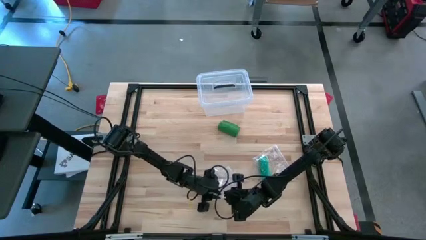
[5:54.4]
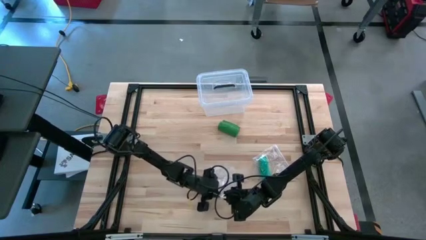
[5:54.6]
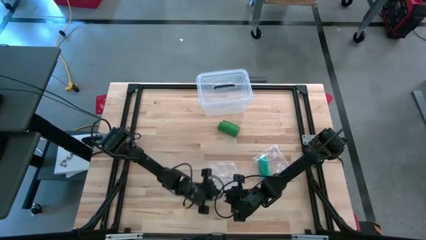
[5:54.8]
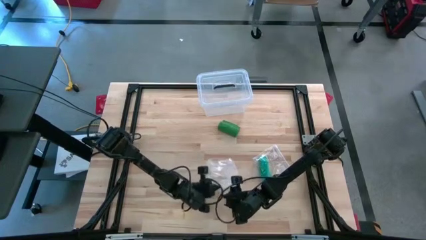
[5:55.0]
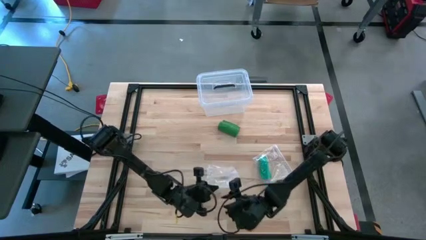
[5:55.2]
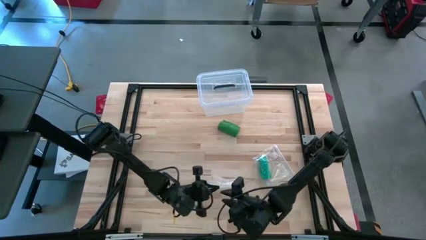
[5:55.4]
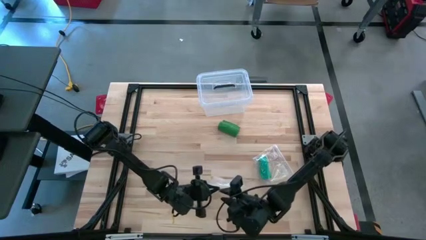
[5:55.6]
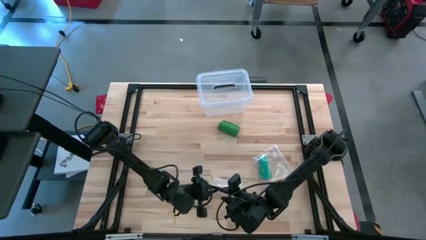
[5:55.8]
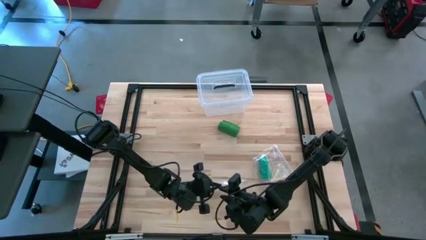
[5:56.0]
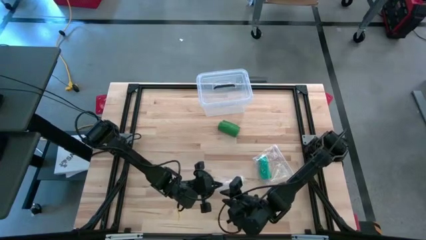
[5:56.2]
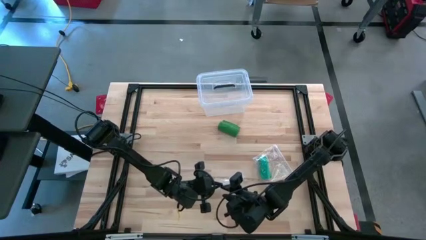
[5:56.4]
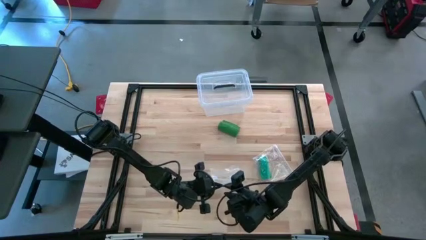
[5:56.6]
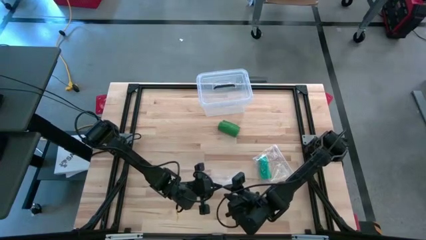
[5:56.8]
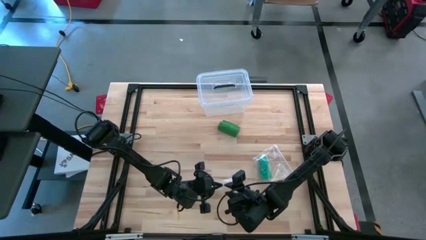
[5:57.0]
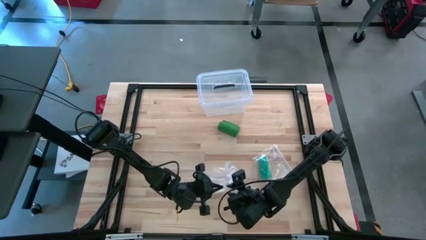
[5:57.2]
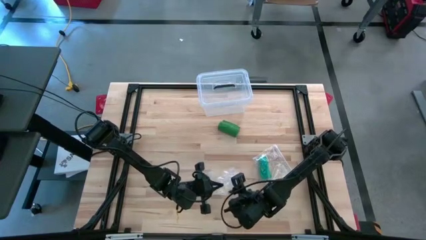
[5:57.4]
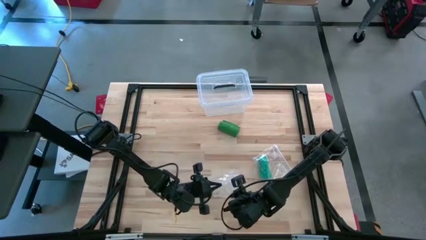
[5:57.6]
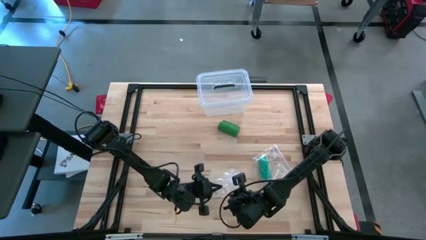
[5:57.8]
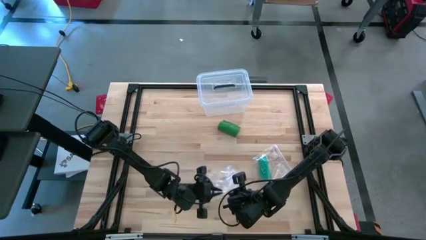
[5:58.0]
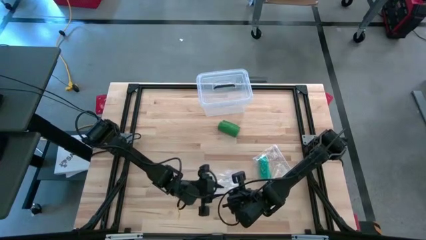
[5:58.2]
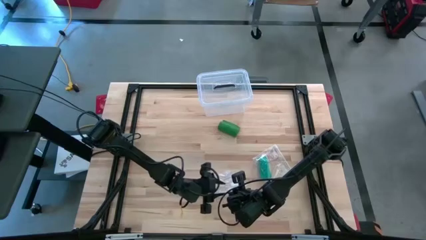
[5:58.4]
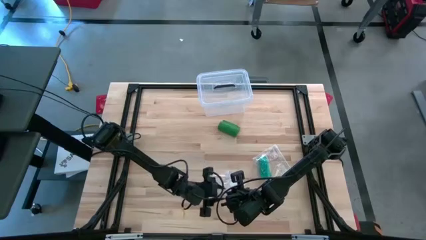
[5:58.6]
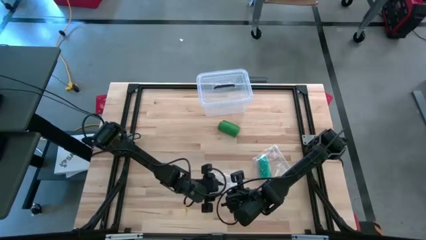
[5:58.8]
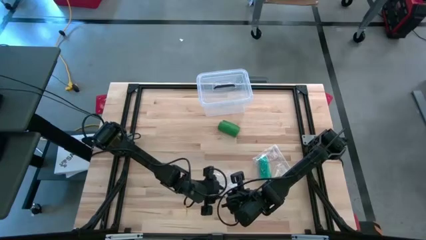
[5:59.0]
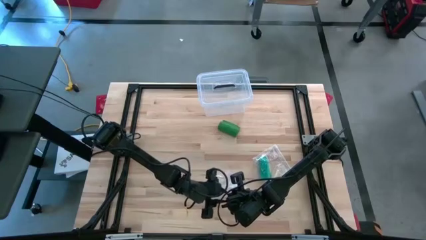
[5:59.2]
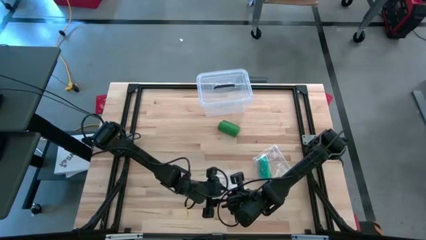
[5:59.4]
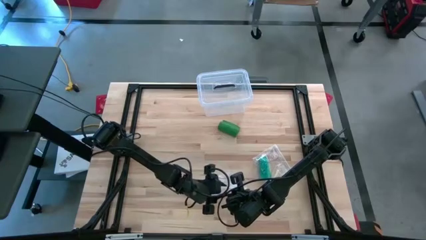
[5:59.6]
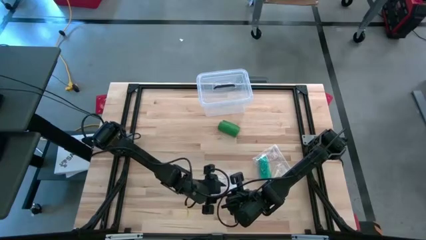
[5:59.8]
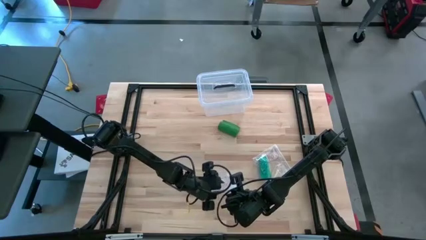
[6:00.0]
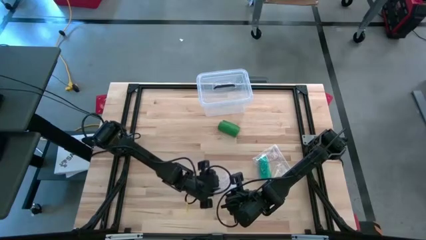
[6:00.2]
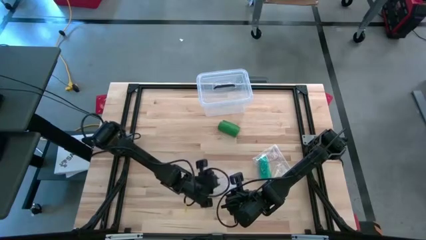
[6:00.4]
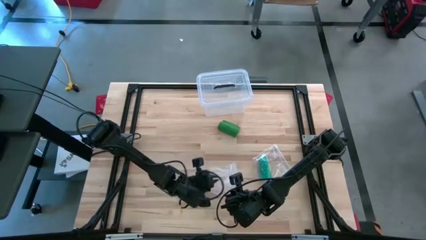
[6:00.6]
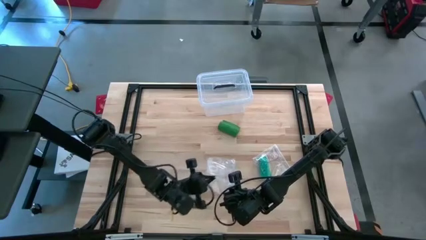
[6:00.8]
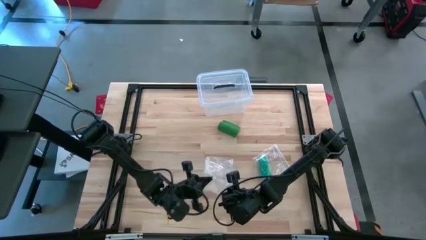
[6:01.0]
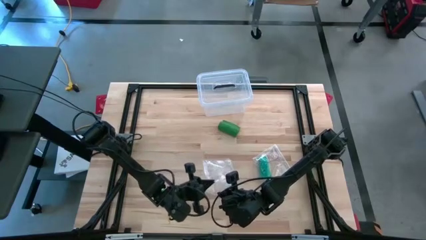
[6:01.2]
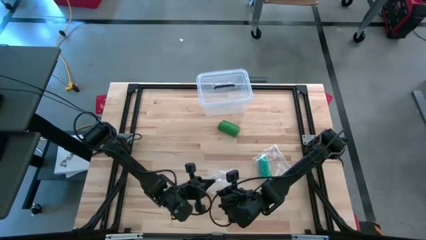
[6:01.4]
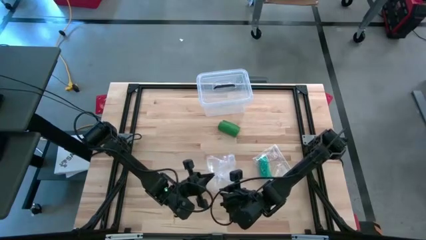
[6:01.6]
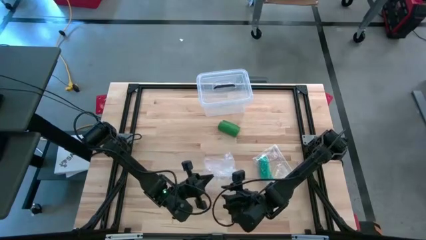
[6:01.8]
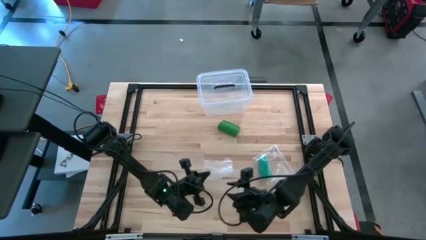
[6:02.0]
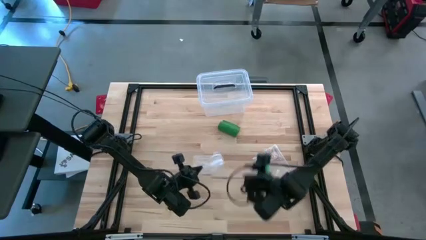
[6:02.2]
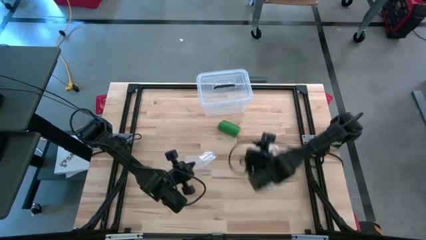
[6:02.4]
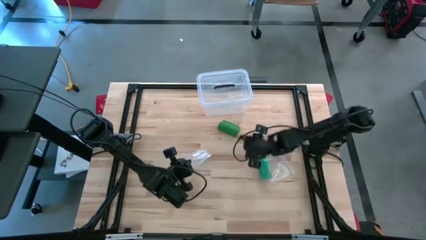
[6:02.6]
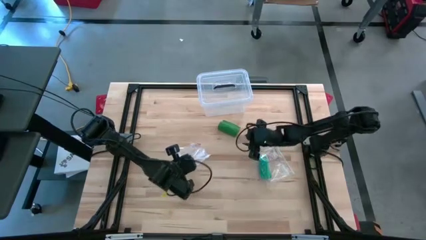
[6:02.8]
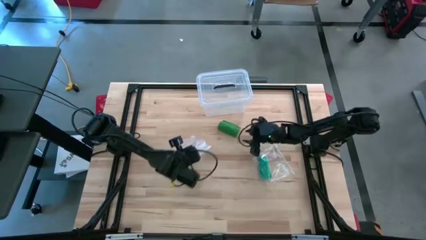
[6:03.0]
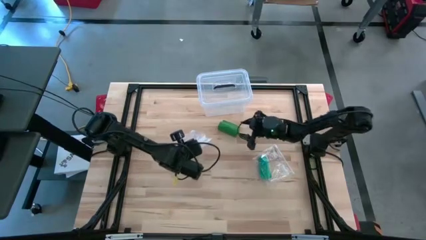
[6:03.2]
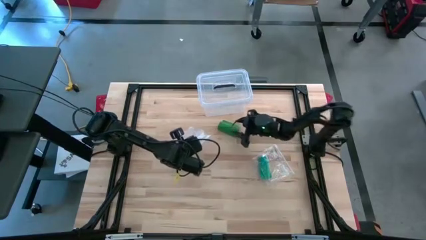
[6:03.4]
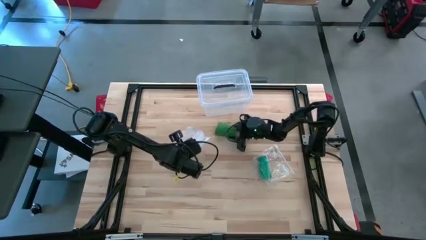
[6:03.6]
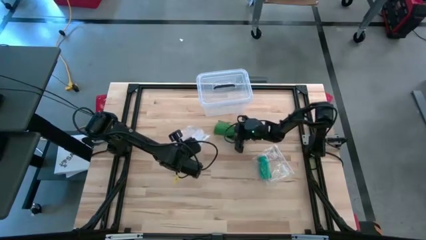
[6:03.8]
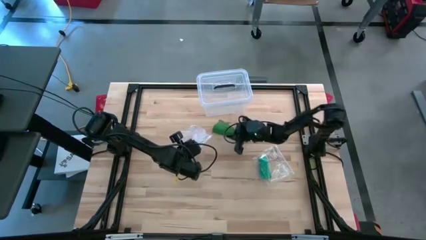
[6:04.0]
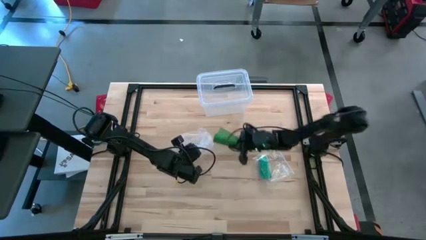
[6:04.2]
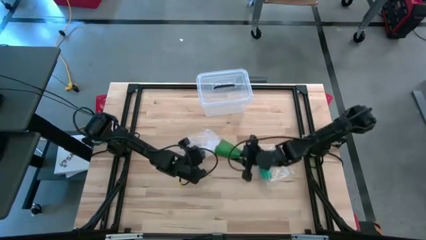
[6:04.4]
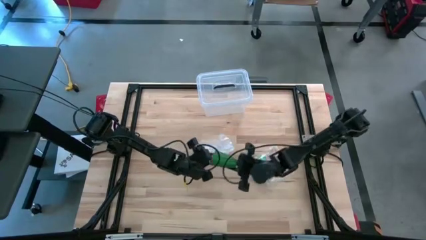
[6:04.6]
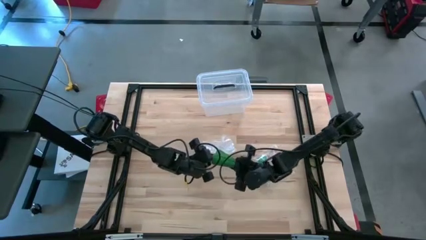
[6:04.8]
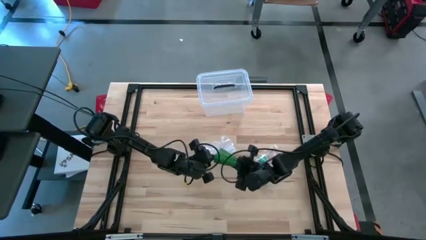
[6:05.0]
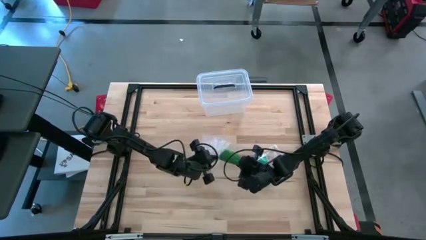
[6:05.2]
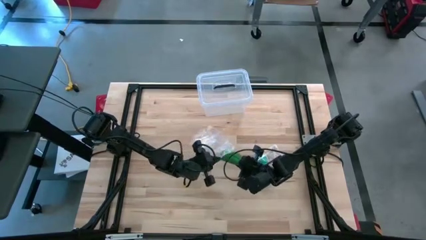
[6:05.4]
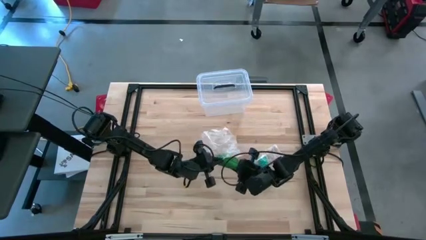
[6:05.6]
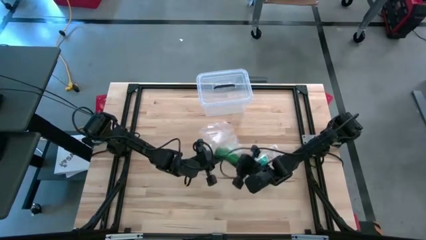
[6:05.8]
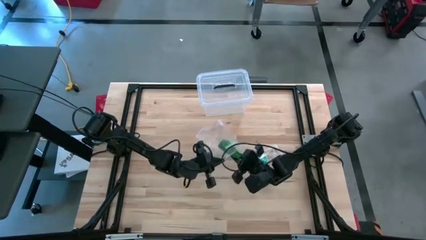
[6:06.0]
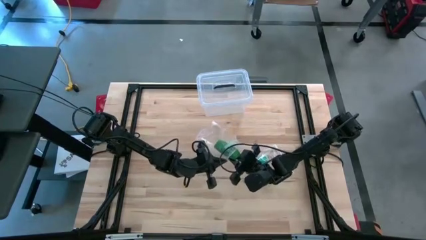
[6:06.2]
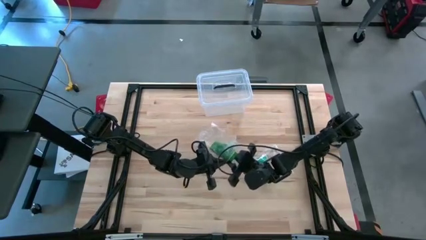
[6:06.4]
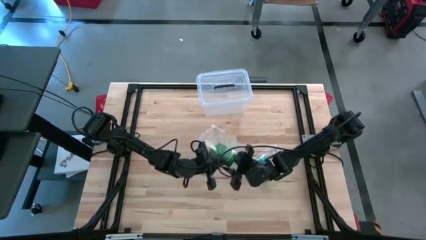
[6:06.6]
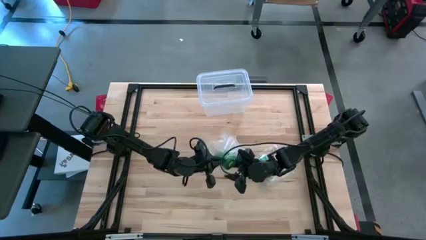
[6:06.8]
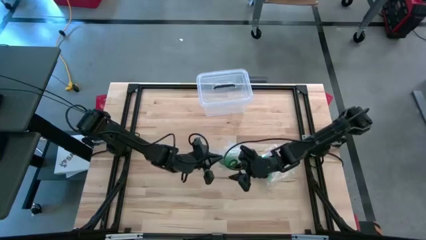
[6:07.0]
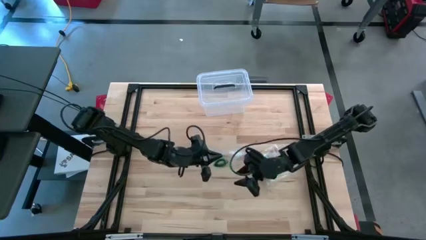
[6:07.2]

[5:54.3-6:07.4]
Task: Roll bandage
Put the rolled green bandage into the transparent zip bag

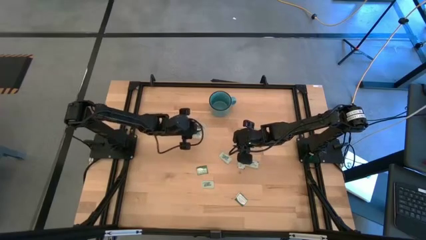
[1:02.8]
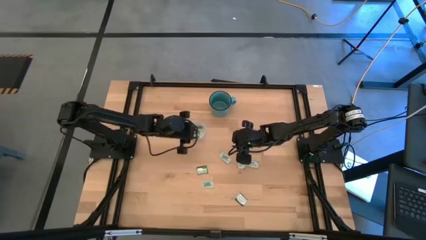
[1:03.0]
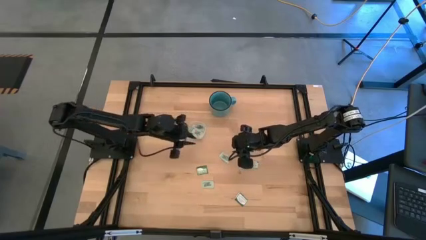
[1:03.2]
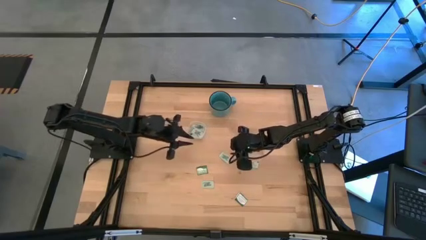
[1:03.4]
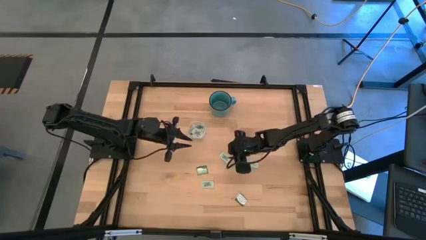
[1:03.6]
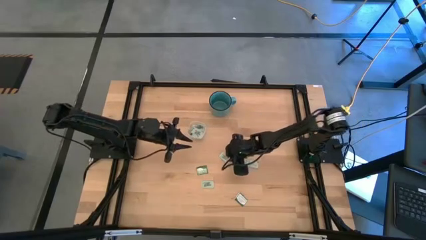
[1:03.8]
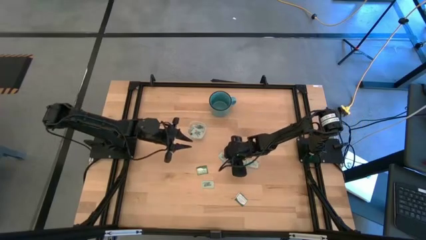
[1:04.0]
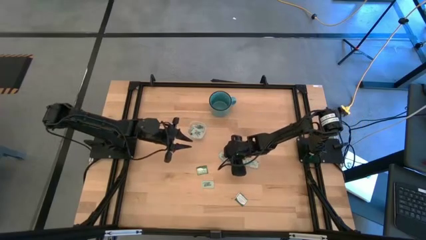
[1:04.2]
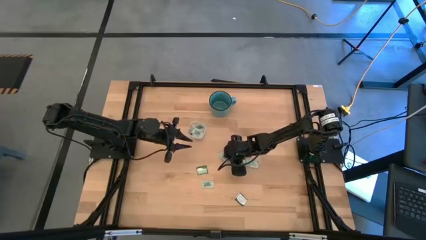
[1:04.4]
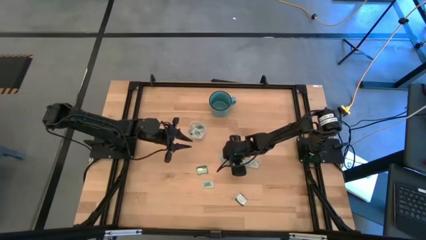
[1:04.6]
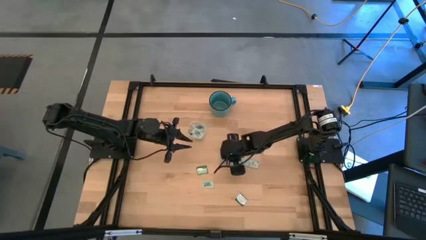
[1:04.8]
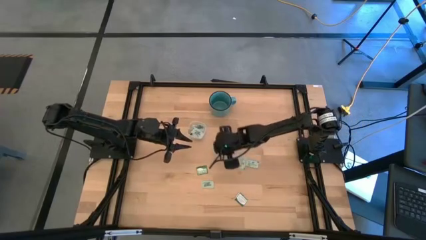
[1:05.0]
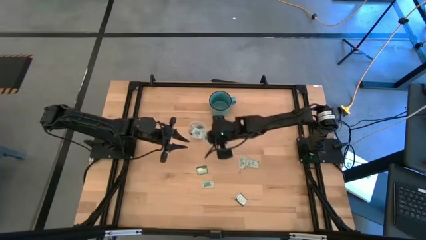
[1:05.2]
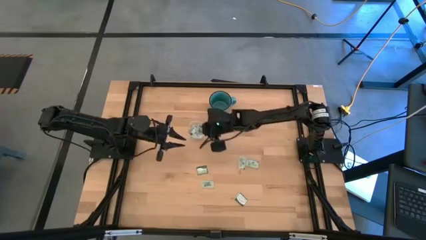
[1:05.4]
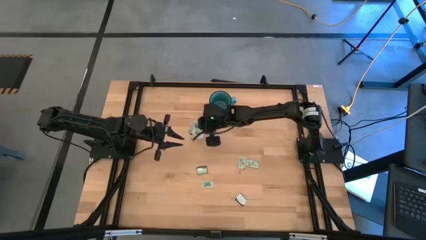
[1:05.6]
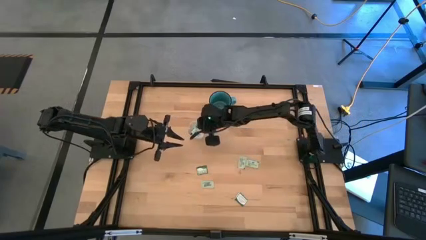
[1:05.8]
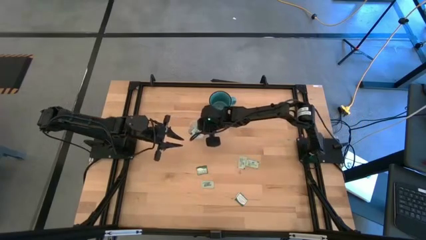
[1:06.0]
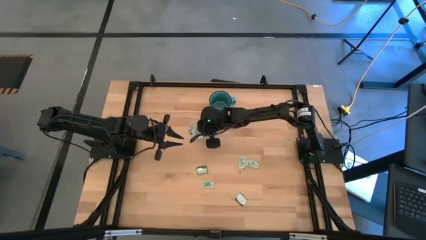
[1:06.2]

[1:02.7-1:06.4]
Task: Pick and place Stevia / Truvia into bins
Put the green stevia packet into the transparent container
